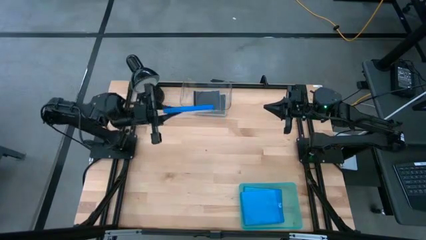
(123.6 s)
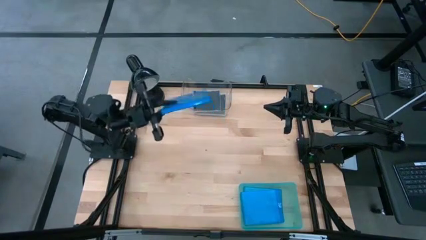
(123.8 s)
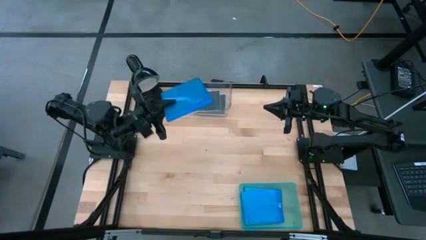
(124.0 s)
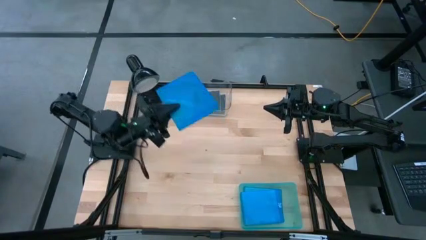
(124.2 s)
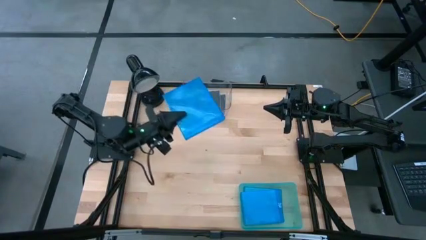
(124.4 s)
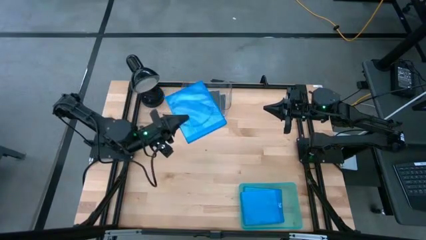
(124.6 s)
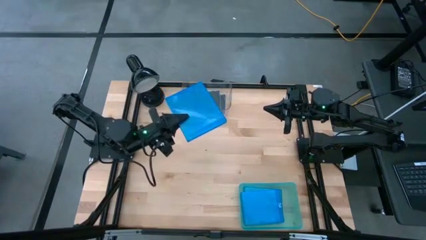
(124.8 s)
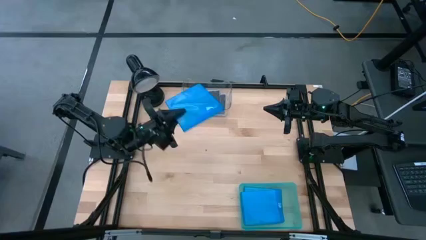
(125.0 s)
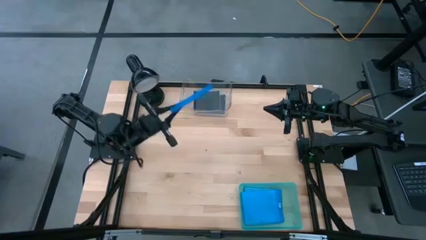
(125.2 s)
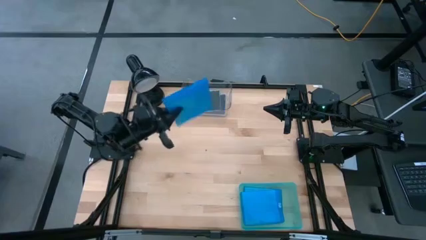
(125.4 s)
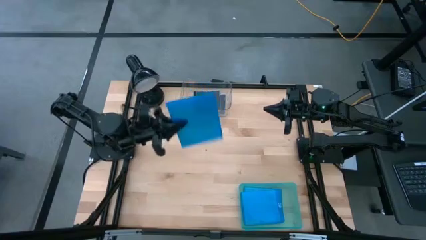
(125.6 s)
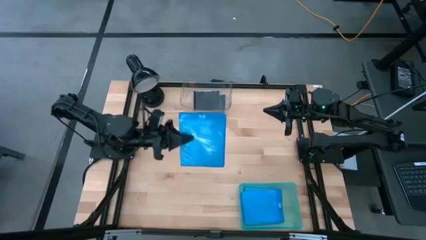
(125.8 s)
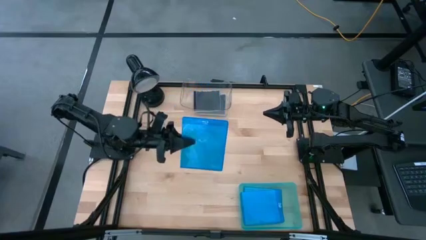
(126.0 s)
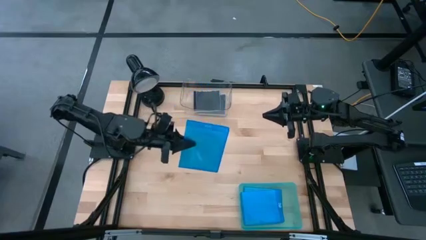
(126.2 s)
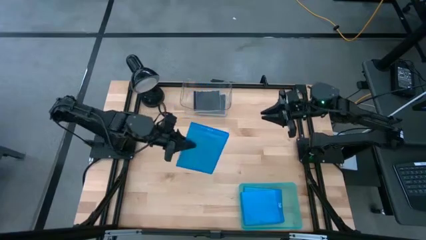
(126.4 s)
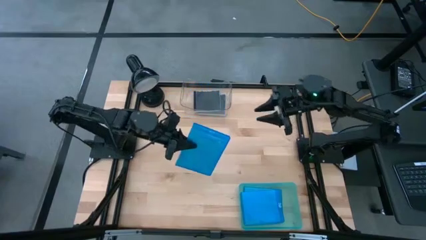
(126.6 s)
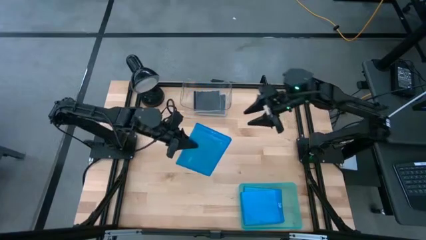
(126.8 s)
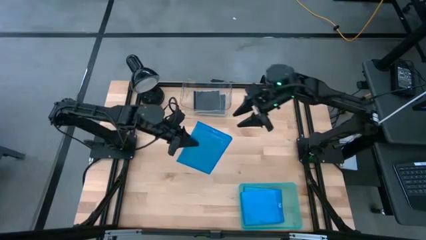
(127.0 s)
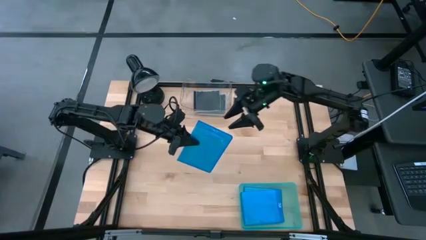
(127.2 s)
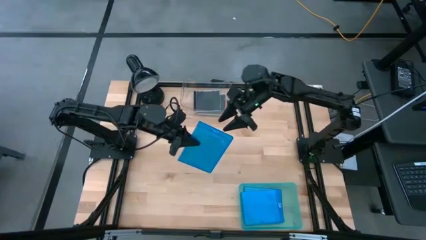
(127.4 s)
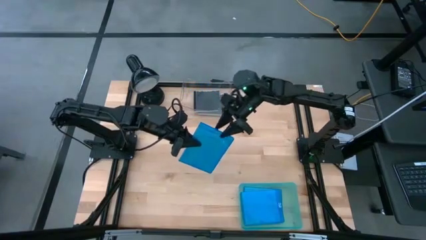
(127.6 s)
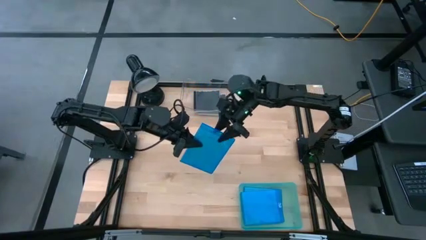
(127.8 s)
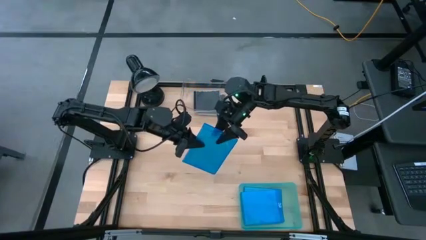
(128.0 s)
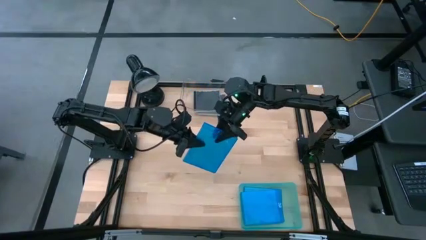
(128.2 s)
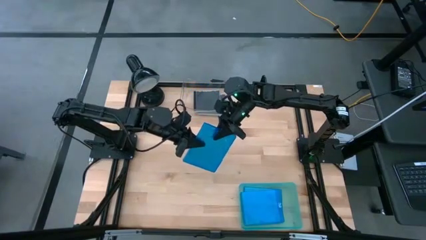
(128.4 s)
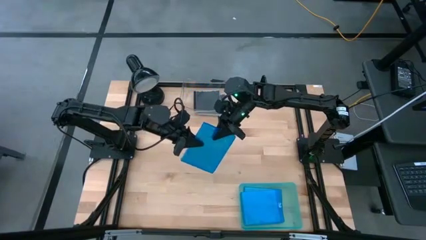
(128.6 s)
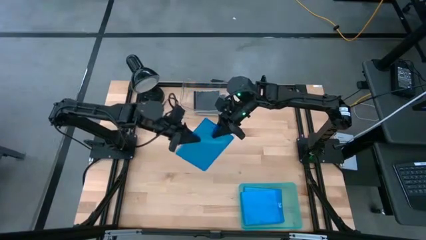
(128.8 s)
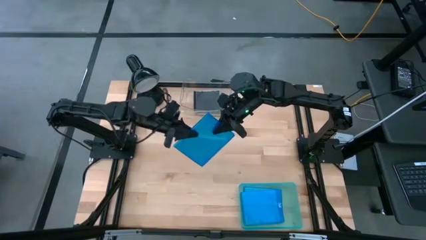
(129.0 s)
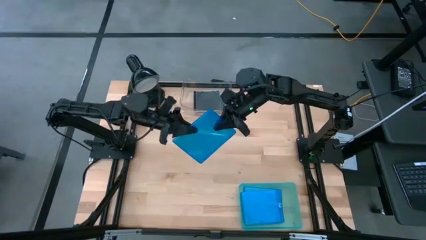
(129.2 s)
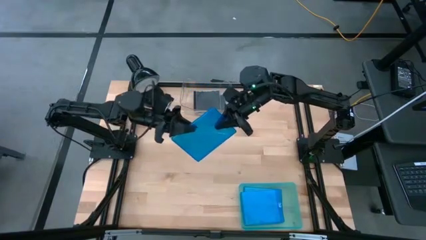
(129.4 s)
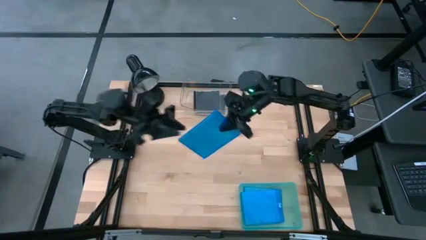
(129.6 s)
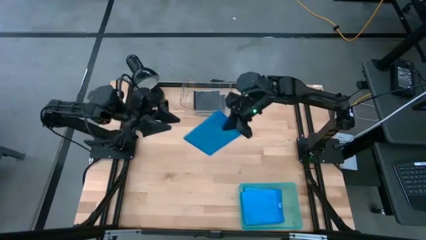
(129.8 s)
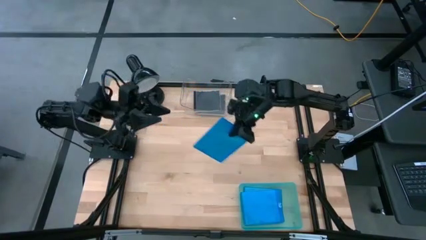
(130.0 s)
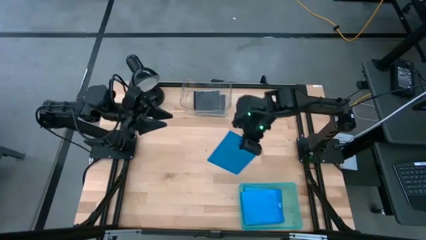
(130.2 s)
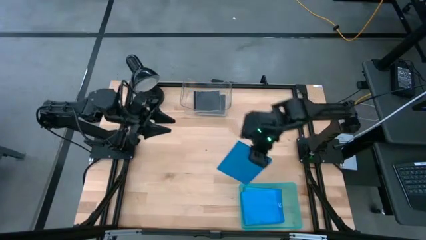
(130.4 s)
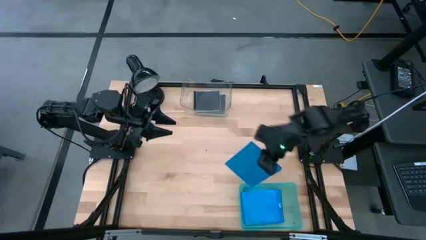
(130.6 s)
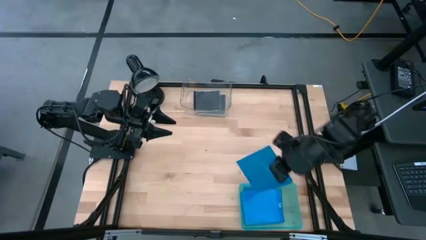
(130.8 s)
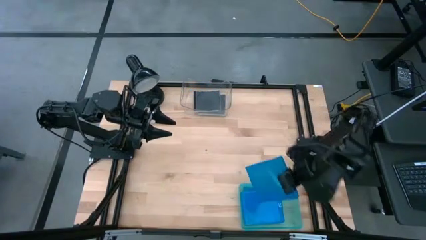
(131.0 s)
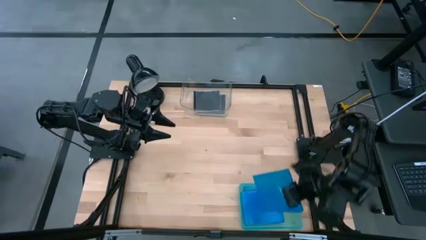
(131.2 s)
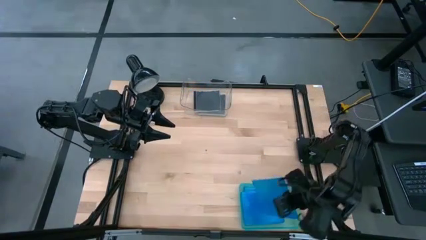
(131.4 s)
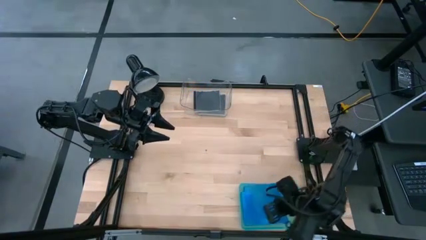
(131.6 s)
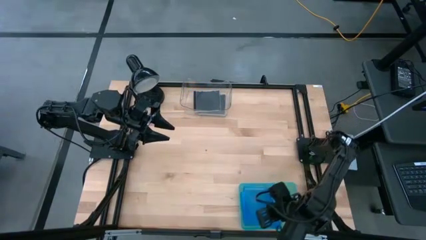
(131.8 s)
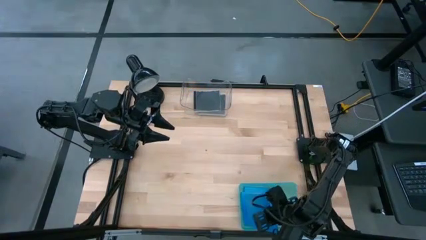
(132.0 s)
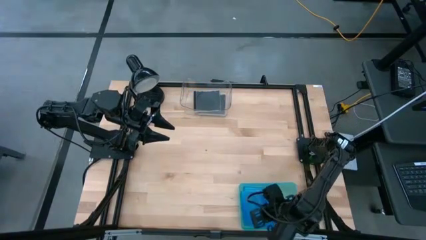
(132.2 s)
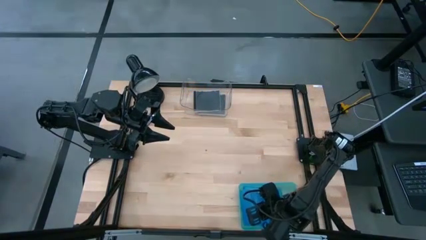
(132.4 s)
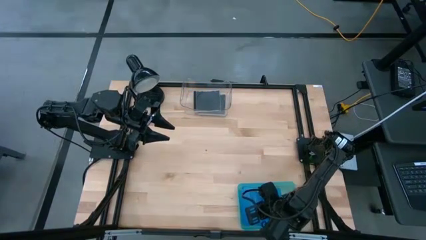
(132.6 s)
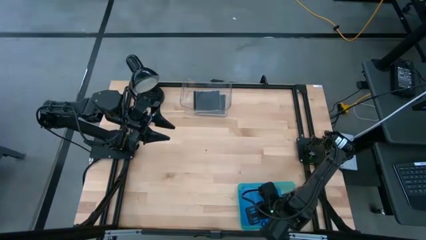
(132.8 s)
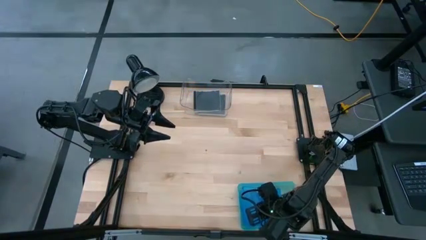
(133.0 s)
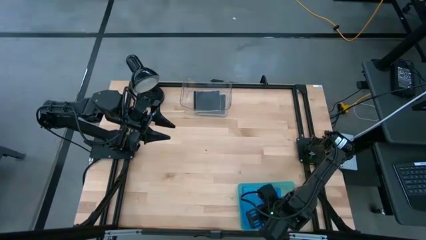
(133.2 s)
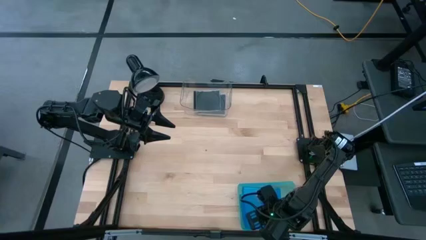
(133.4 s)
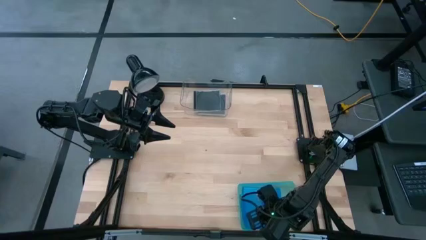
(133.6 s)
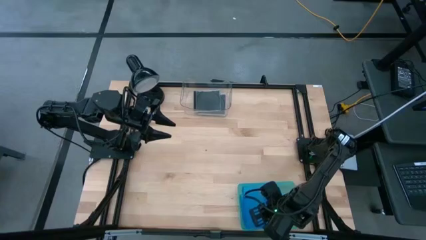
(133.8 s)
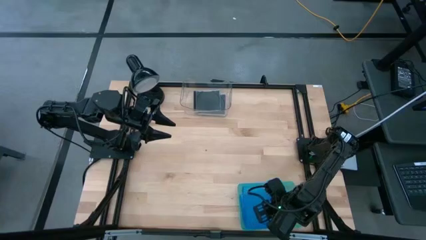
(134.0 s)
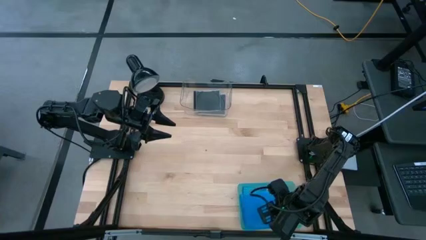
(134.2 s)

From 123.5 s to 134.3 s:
Task: Pick & place jewel cases by type
Put the blue cd case into the green bin

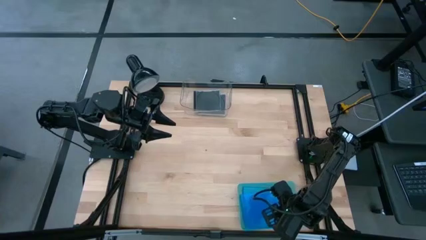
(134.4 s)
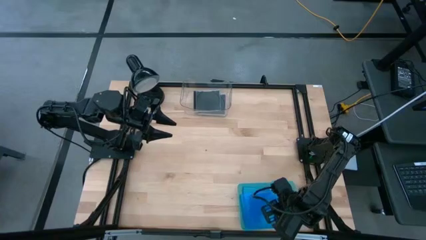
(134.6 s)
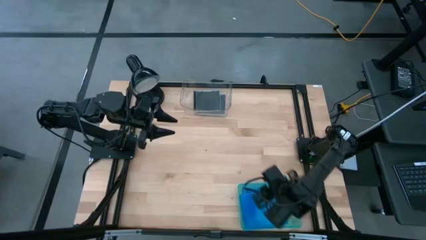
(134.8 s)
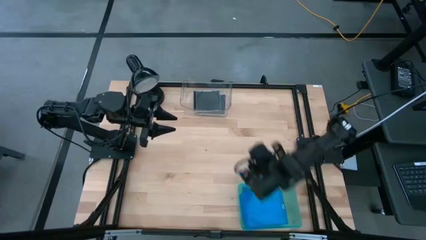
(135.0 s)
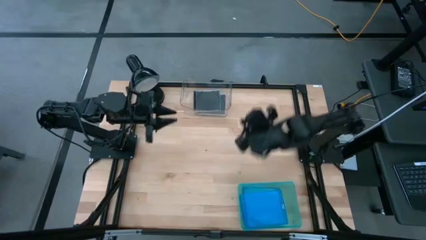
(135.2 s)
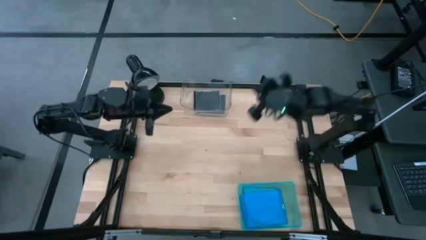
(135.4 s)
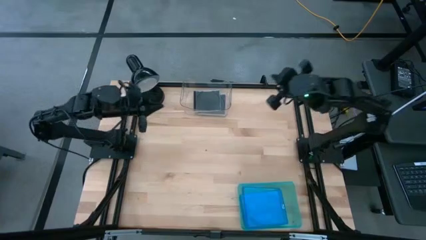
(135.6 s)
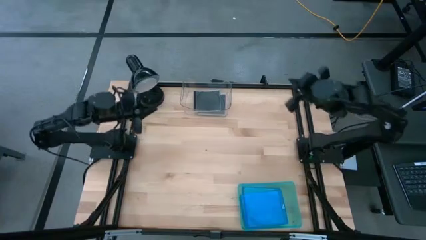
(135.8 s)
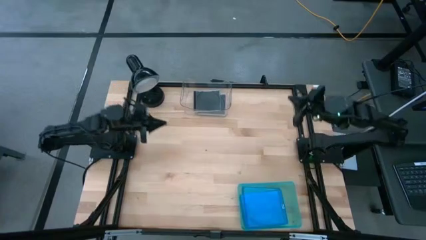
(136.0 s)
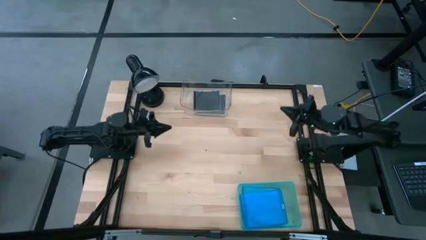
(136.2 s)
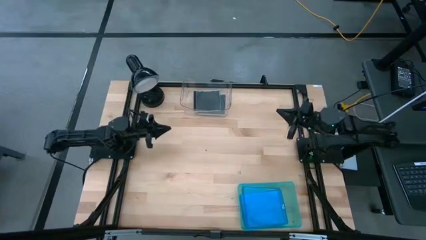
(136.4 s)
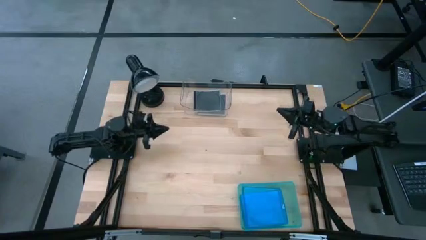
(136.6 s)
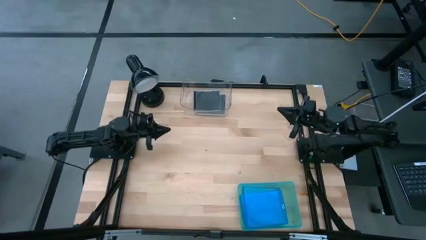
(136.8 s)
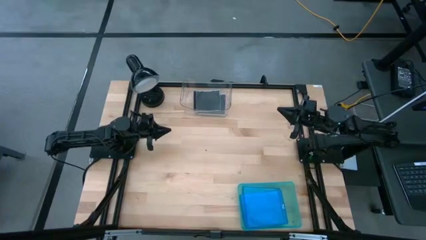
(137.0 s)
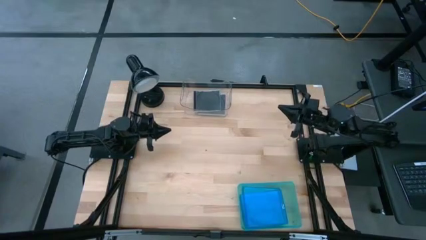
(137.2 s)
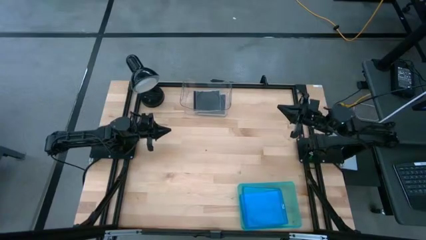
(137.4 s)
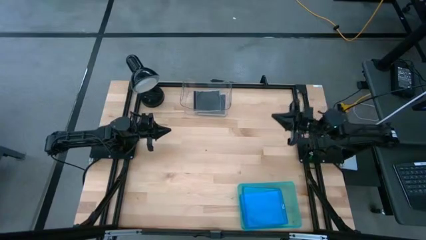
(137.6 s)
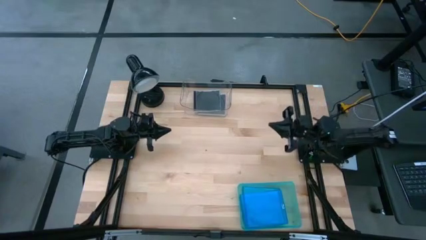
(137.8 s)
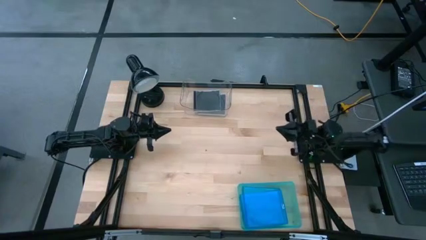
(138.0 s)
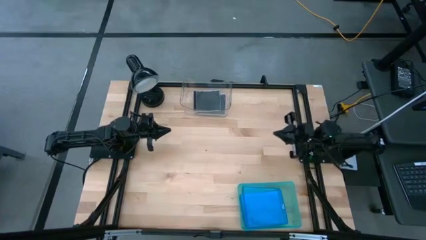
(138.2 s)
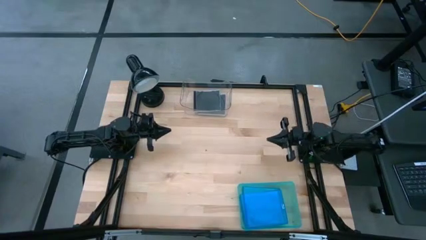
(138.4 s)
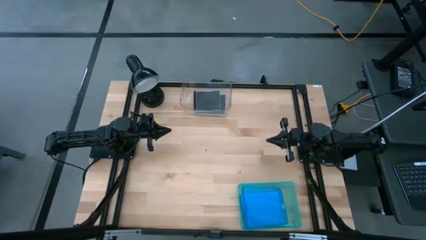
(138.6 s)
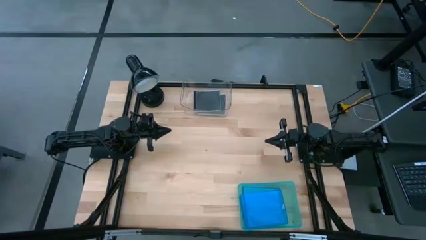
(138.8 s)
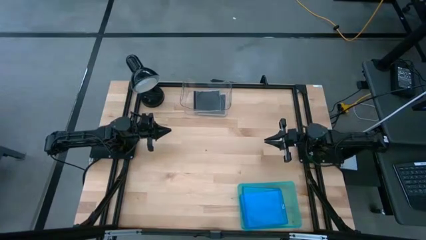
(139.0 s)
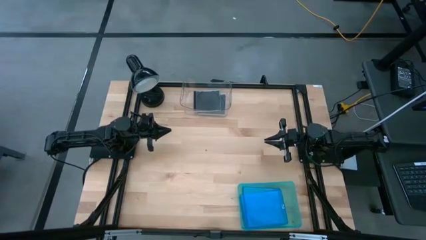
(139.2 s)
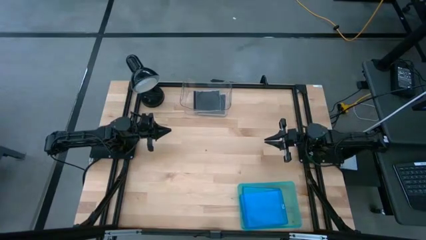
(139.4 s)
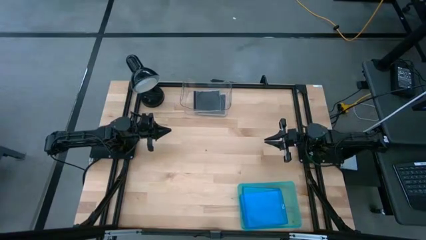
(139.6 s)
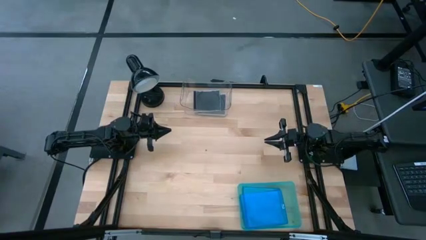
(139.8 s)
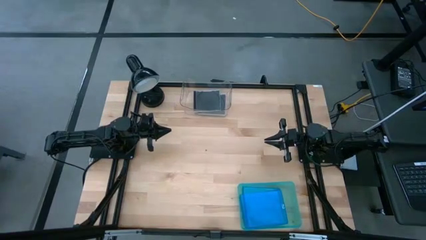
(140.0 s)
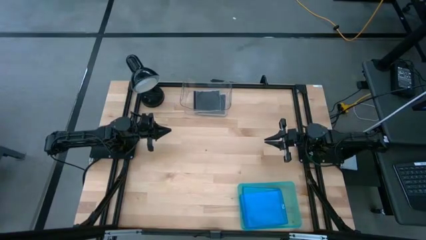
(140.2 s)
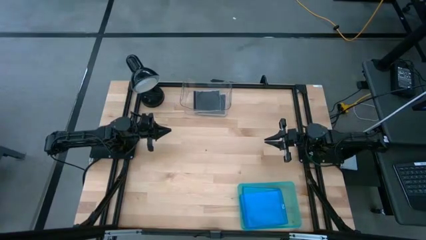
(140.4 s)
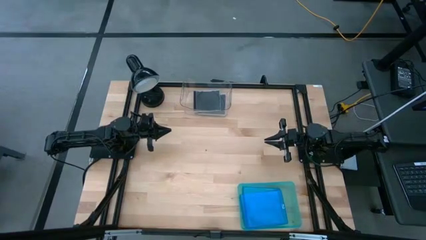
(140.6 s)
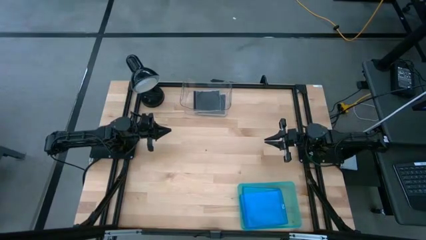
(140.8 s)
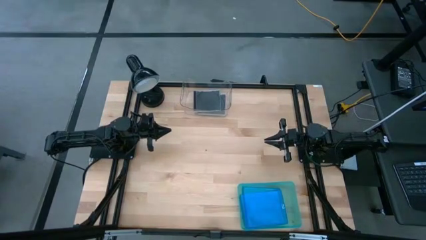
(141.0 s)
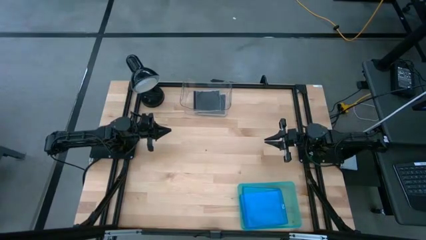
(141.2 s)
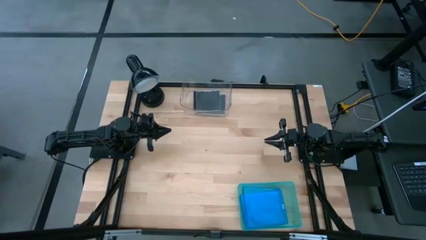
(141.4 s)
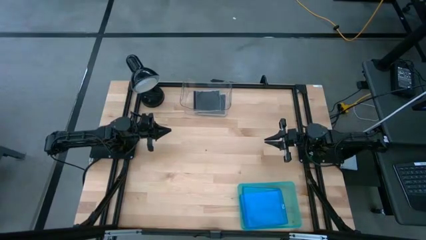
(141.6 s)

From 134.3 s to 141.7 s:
Return to Home Position
